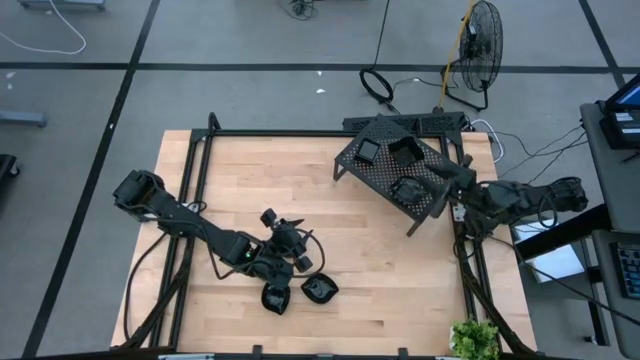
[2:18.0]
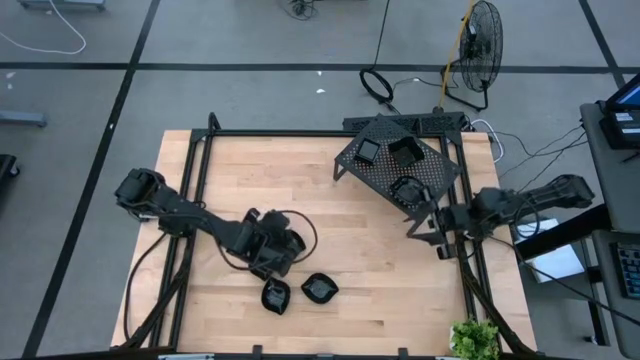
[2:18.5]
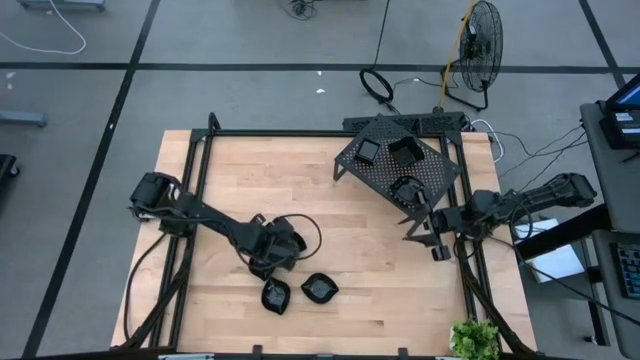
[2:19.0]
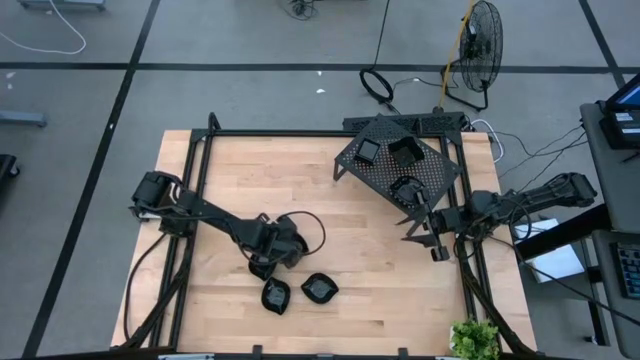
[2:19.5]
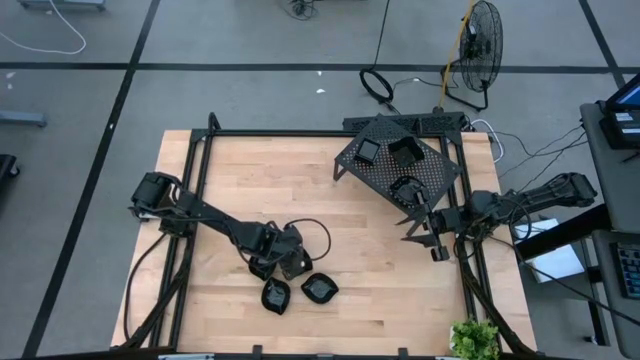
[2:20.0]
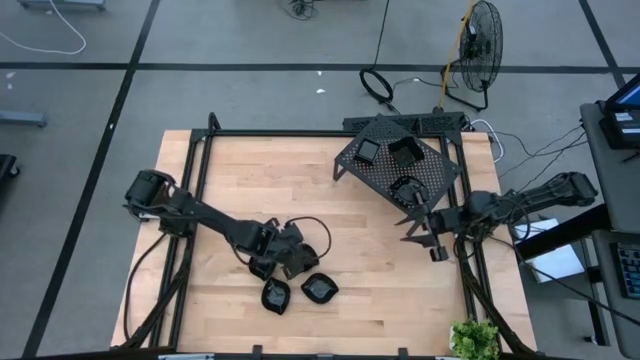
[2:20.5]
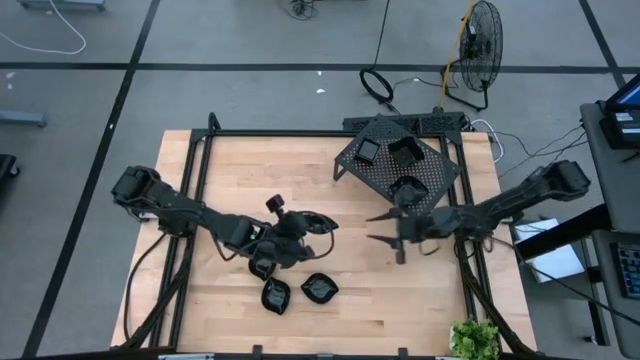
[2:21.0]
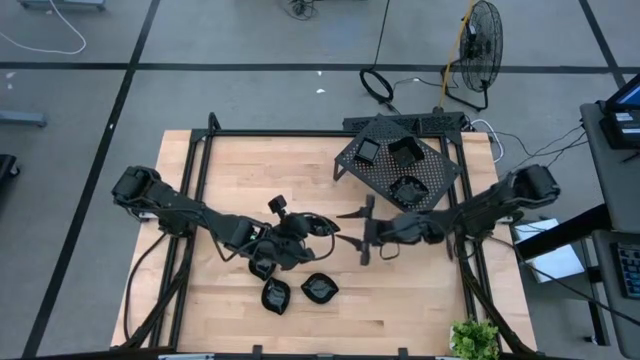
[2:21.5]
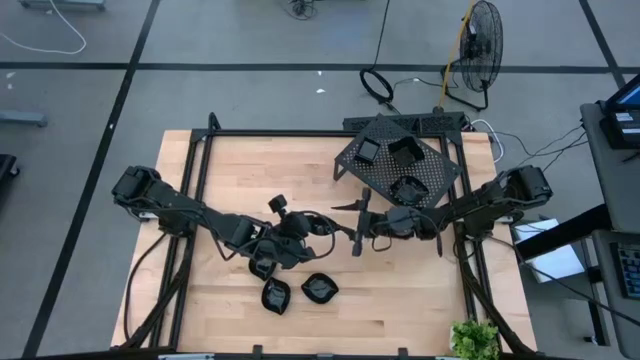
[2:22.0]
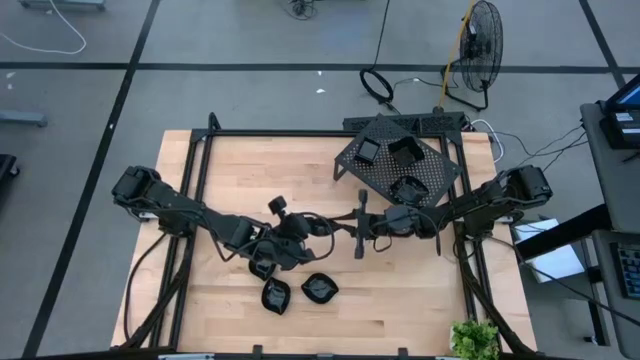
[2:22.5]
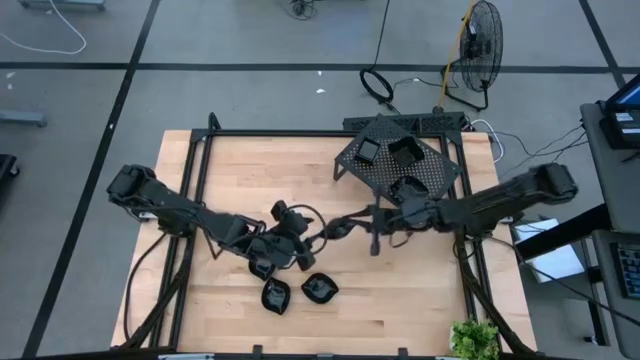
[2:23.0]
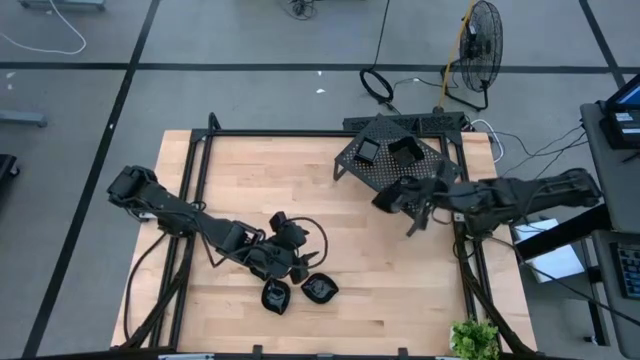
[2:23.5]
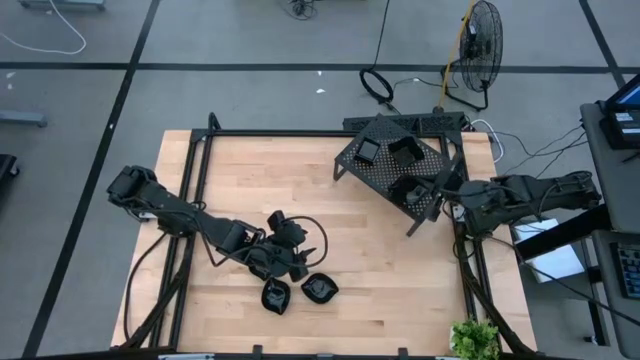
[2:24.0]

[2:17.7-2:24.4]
Task: Pick & Place Mini shaped plates
Stack the black leaf shaped plate on the black leaf shaped plate on the shelf

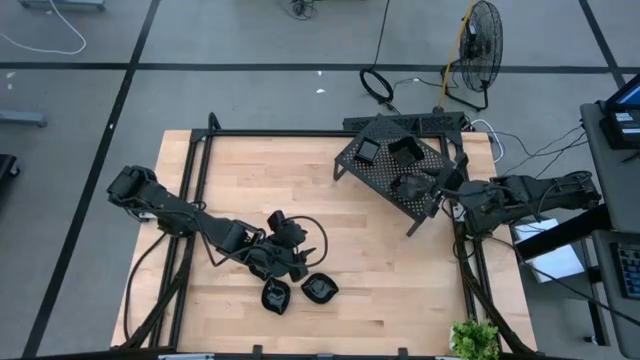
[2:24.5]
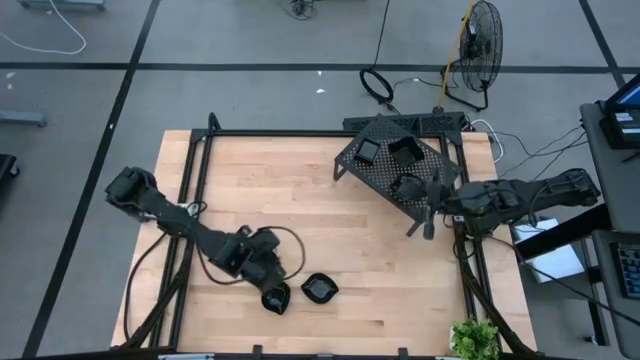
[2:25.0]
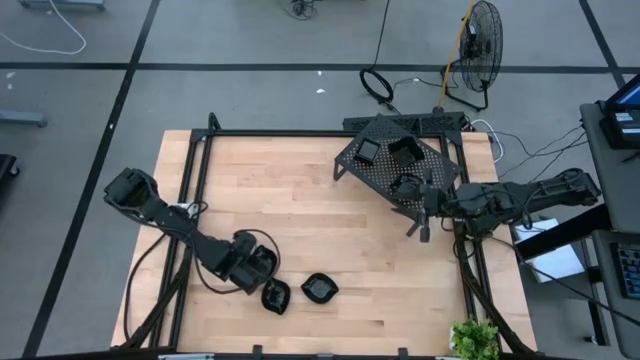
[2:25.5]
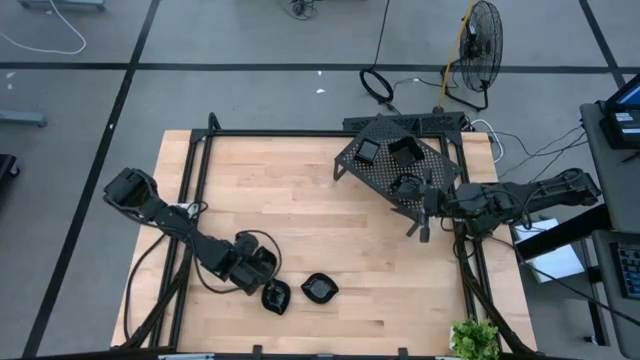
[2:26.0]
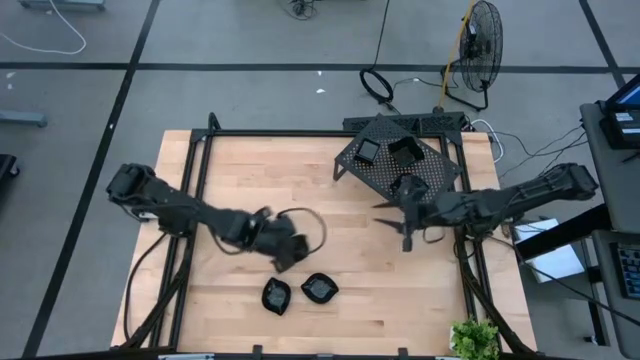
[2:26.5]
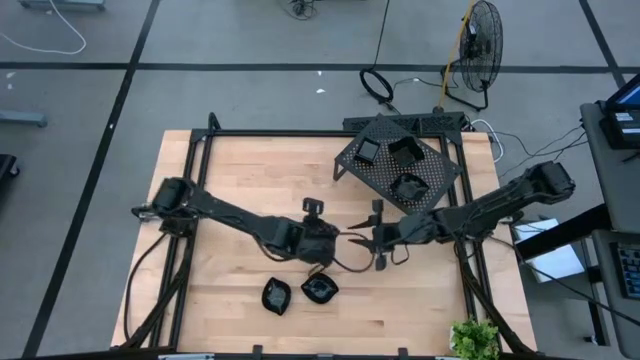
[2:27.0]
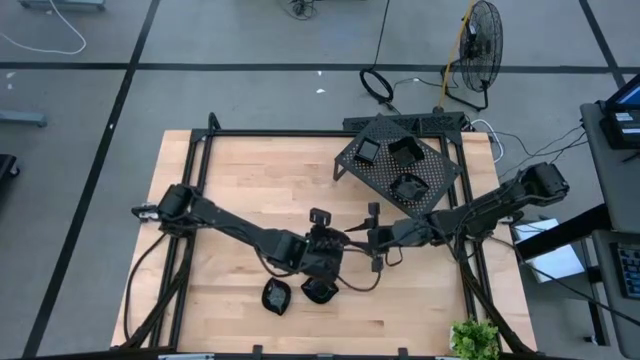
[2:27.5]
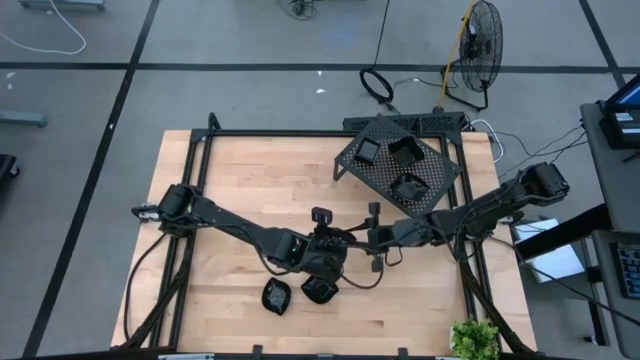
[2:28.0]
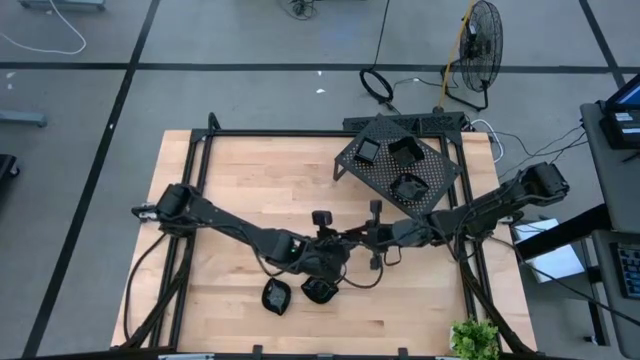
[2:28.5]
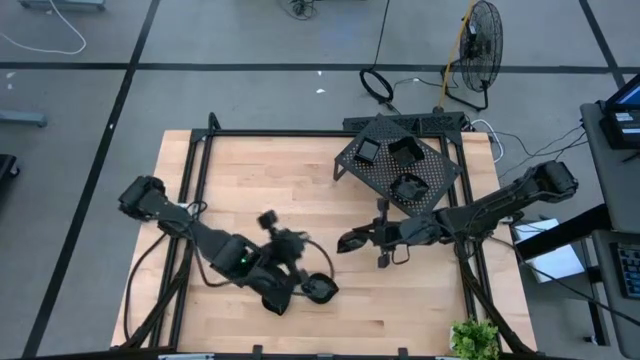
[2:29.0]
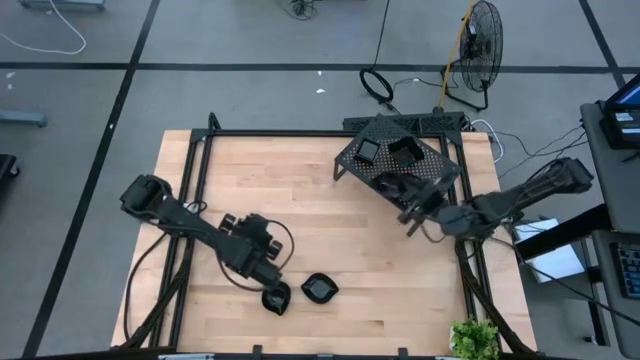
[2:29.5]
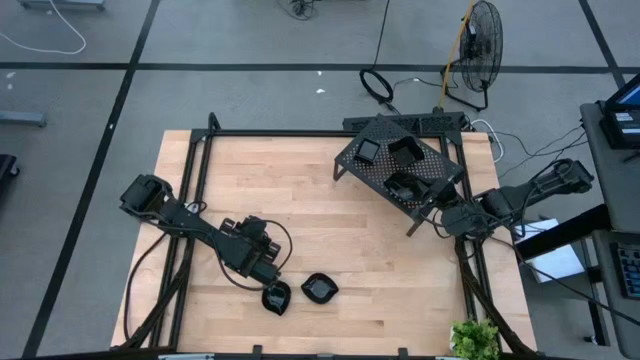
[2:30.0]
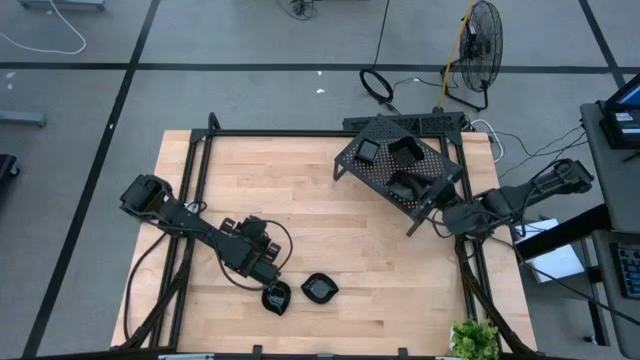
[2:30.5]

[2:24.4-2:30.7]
Stack the black leaf shaped plate on the black leaf shaped plate on the shelf

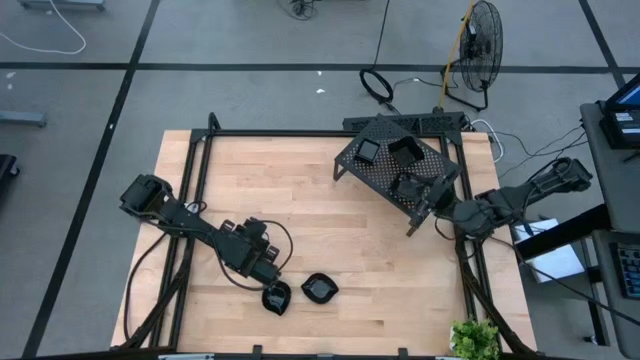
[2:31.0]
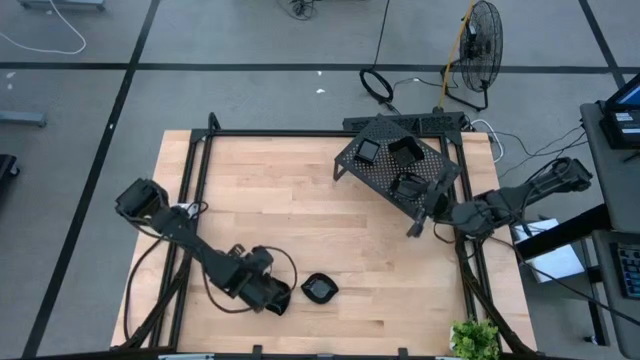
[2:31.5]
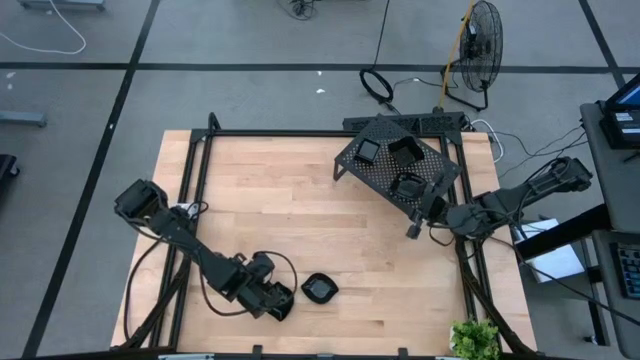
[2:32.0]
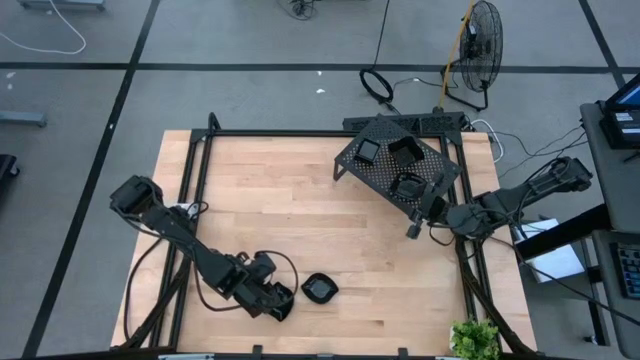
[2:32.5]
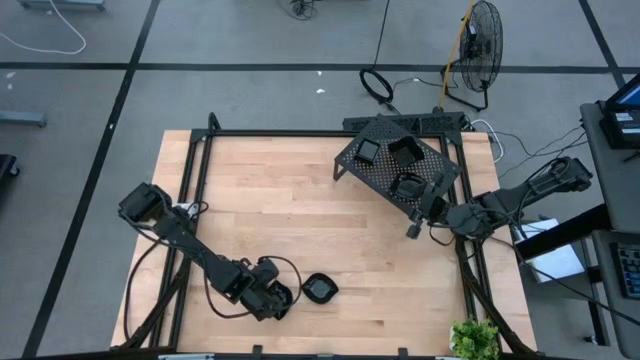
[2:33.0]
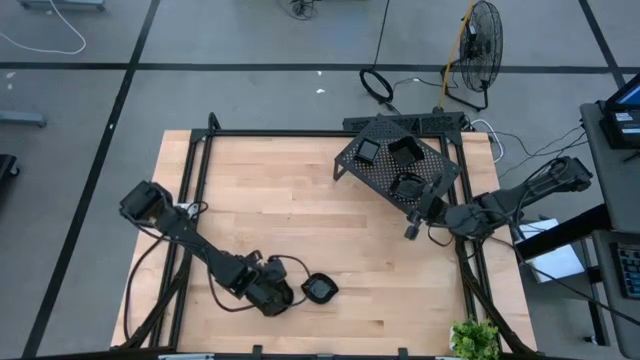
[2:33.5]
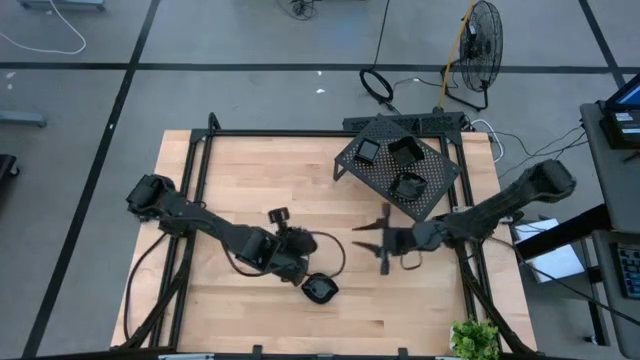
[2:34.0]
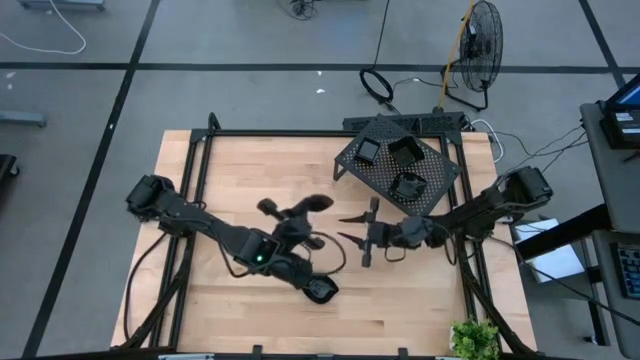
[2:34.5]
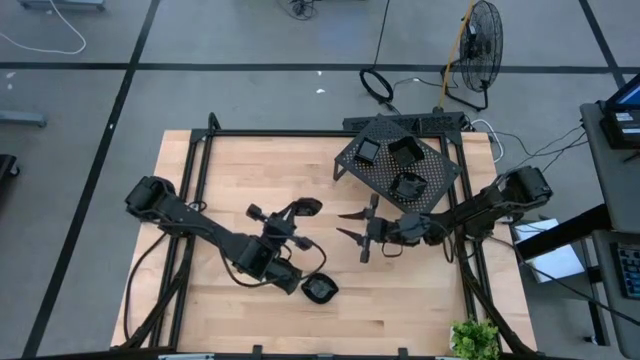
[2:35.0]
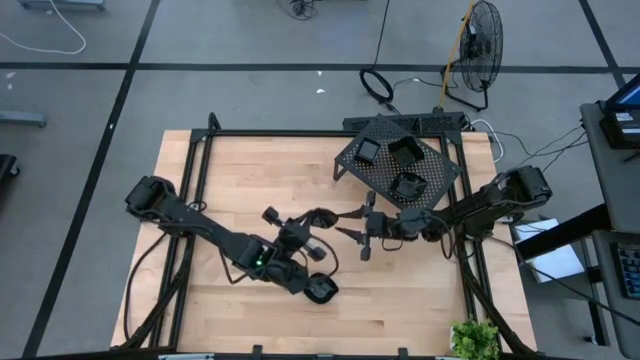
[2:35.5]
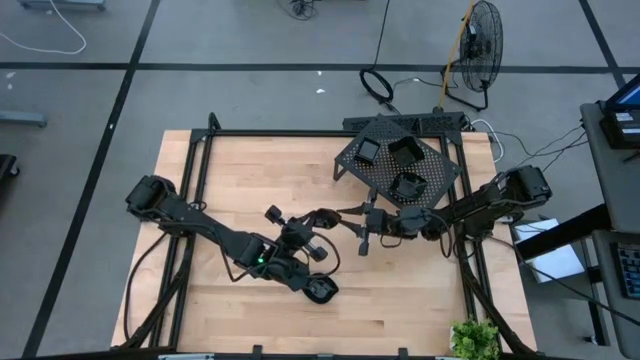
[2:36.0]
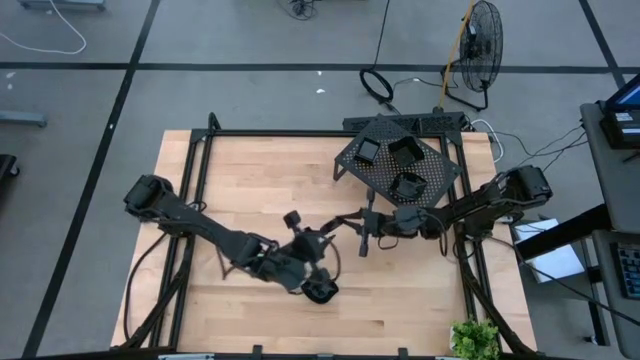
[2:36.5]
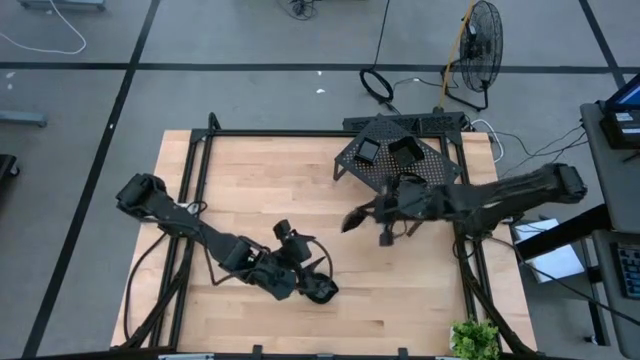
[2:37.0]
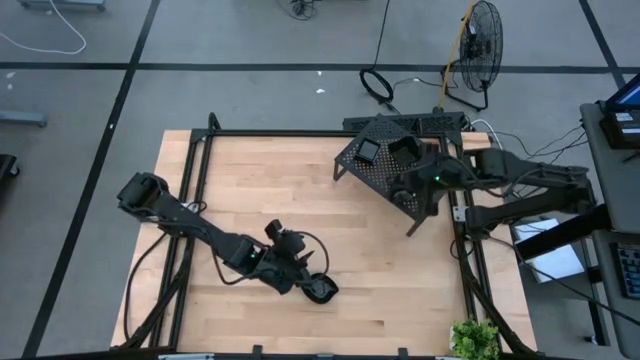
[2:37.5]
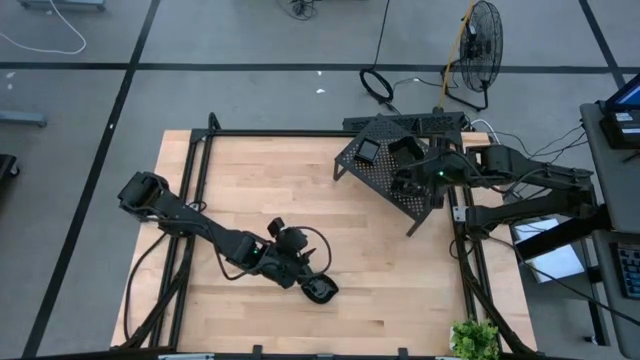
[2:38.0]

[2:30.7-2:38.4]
Stack the black leaf shaped plate on the black leaf shaped plate on the shelf
